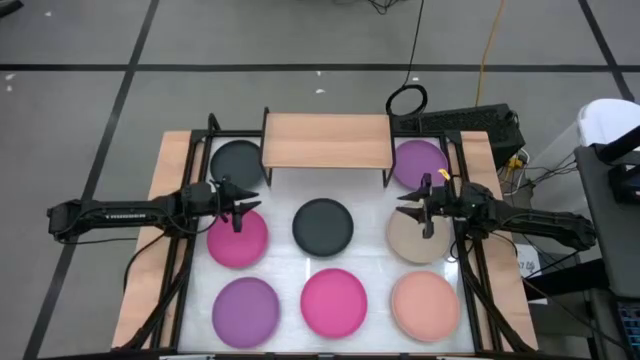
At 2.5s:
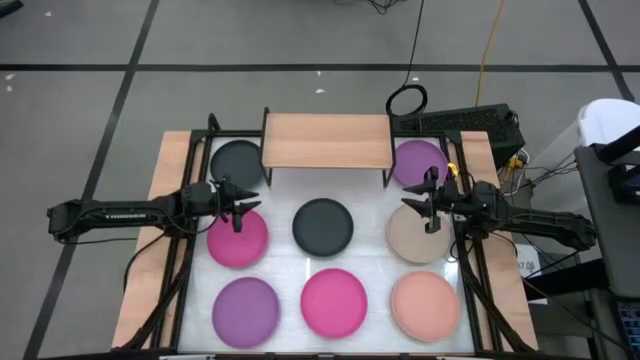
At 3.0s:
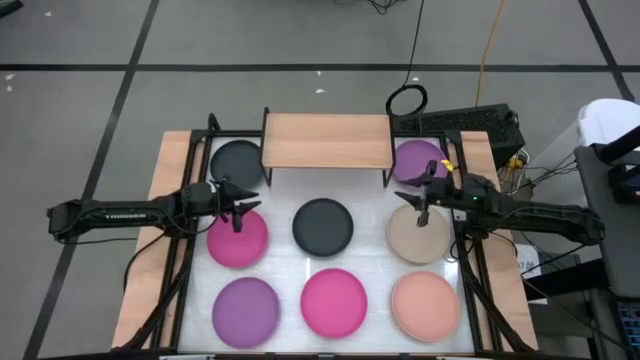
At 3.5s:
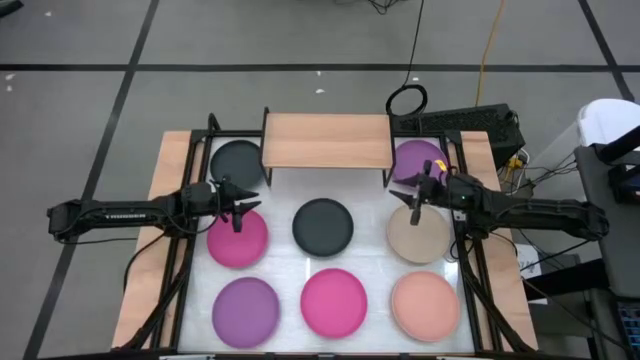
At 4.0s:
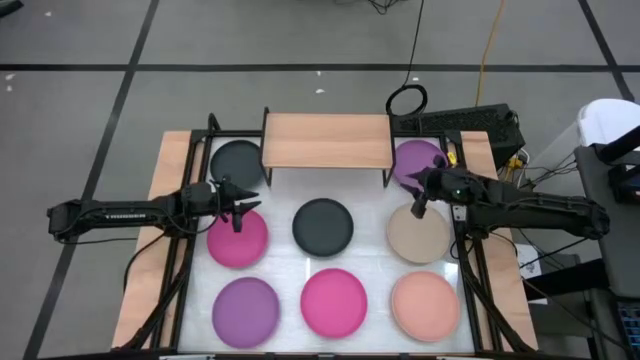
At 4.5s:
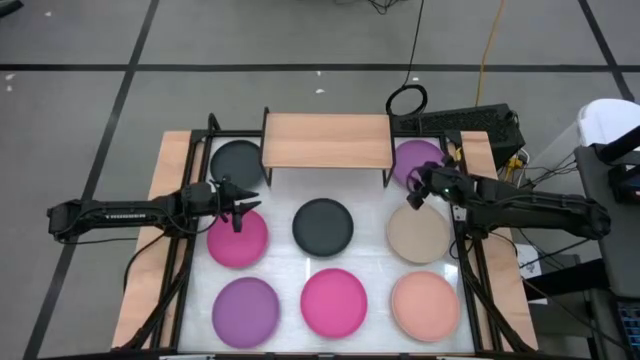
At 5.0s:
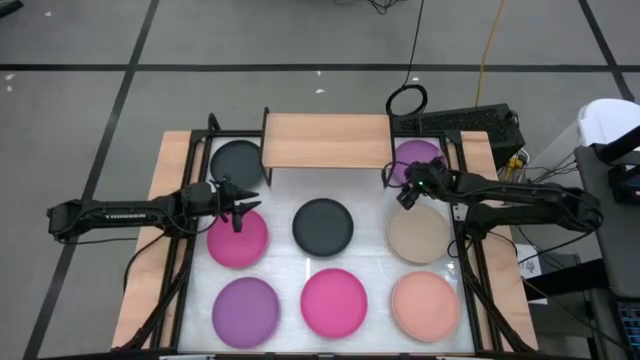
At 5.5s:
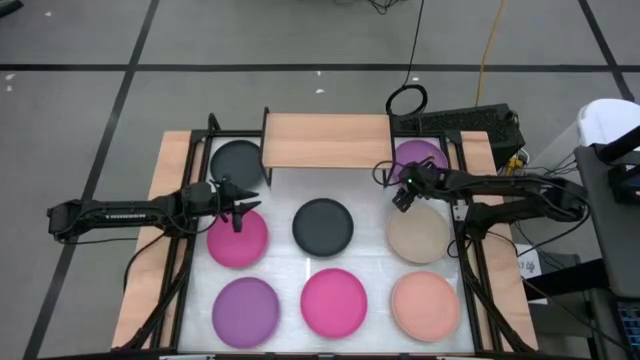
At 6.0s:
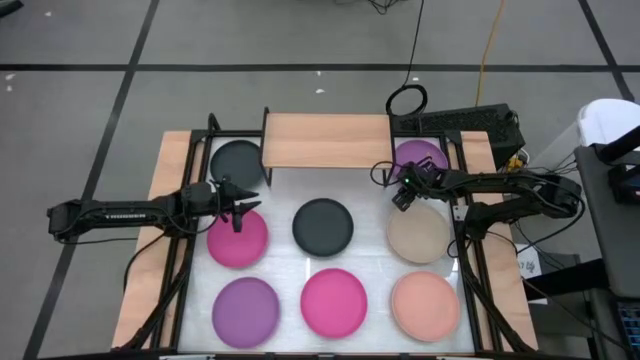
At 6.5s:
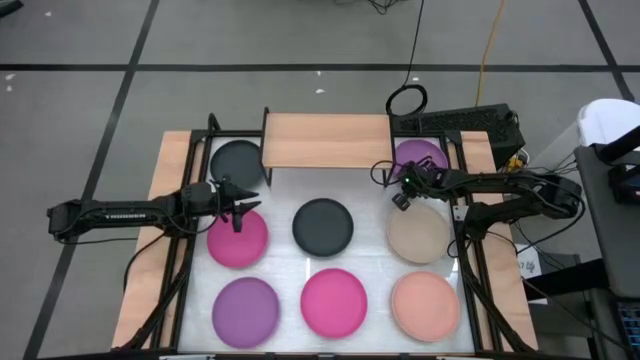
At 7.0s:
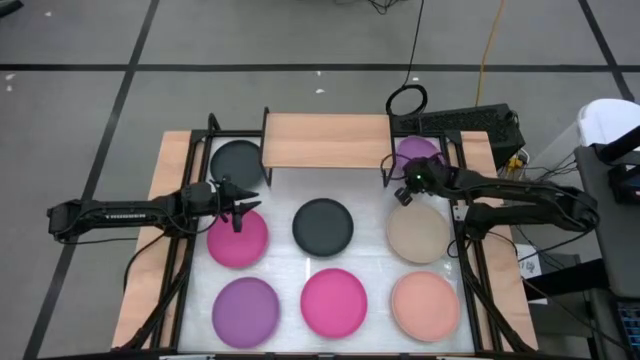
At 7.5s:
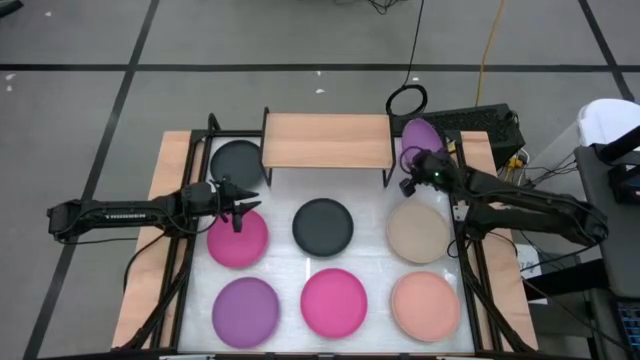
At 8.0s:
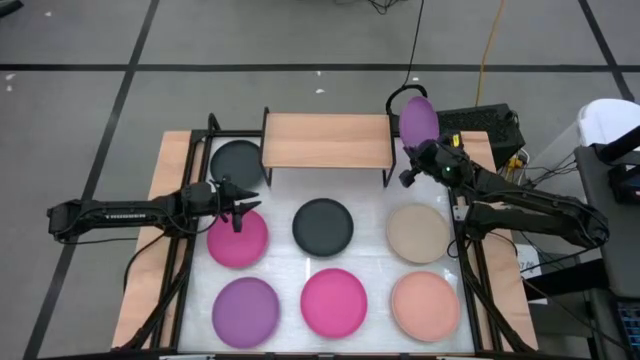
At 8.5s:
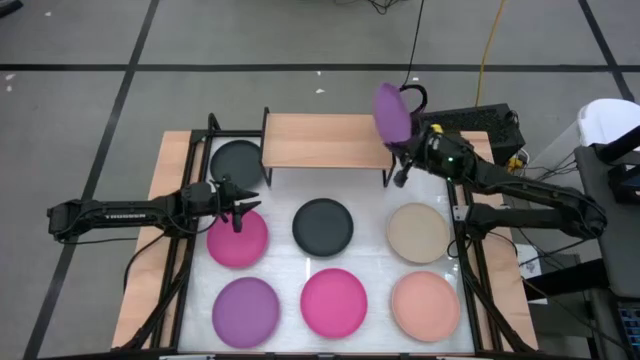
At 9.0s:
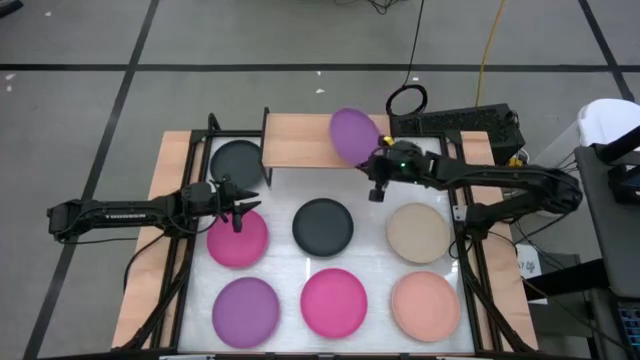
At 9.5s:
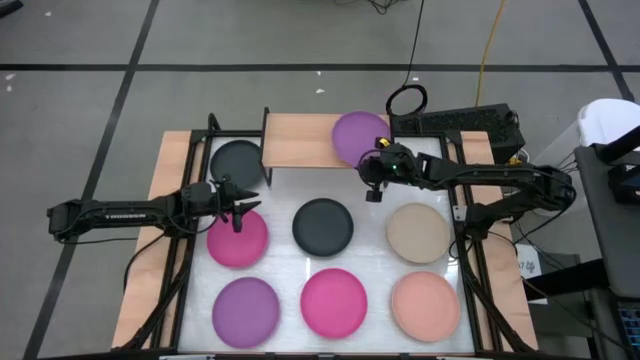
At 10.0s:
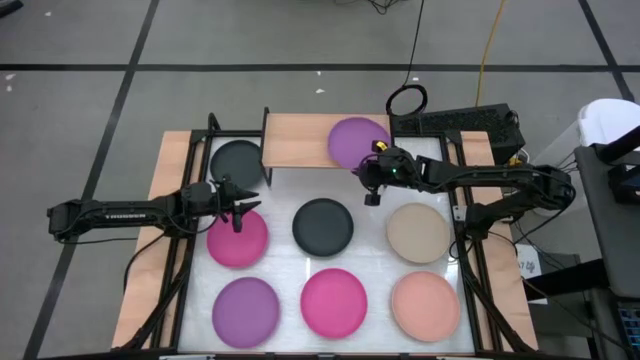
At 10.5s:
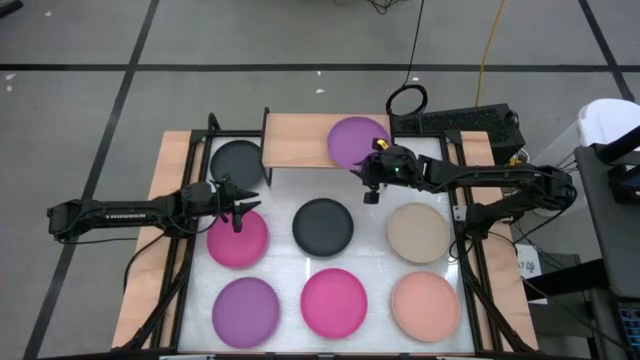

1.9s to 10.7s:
Task: Place and stack plates onto a shelf
Put the top violet plate on the shelf

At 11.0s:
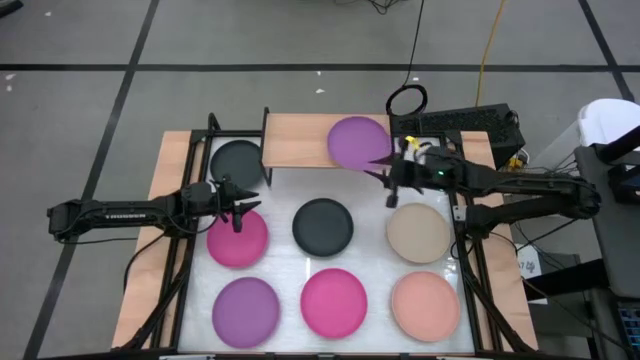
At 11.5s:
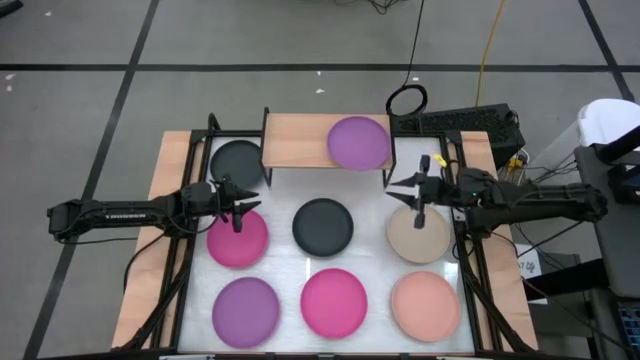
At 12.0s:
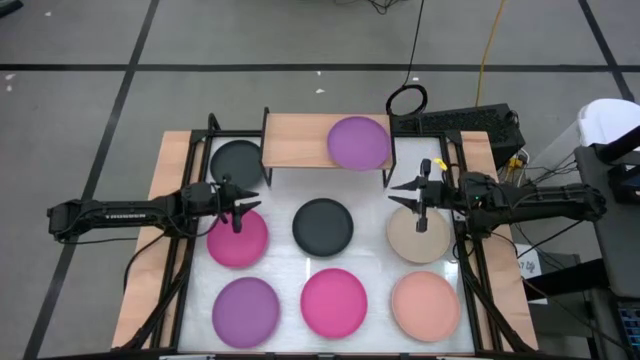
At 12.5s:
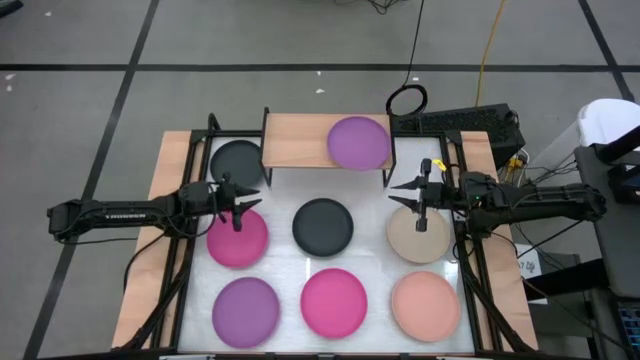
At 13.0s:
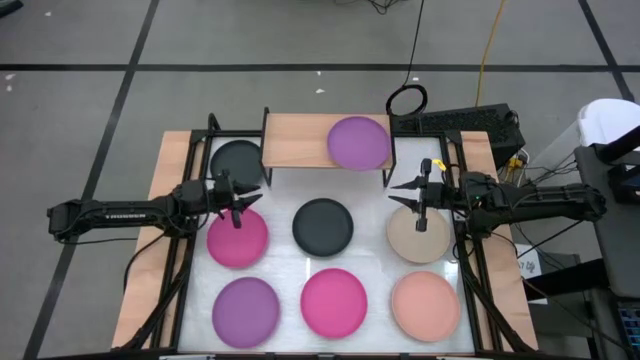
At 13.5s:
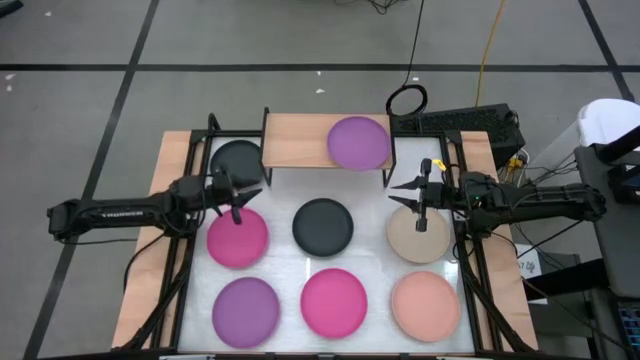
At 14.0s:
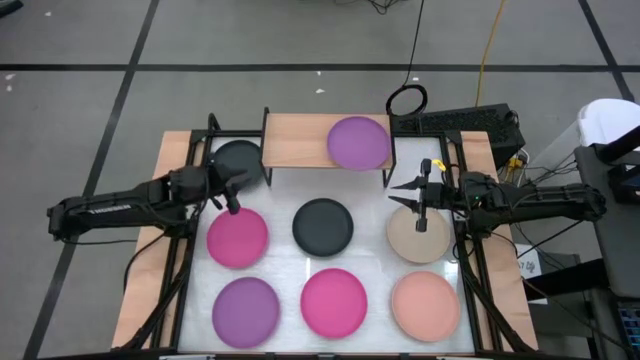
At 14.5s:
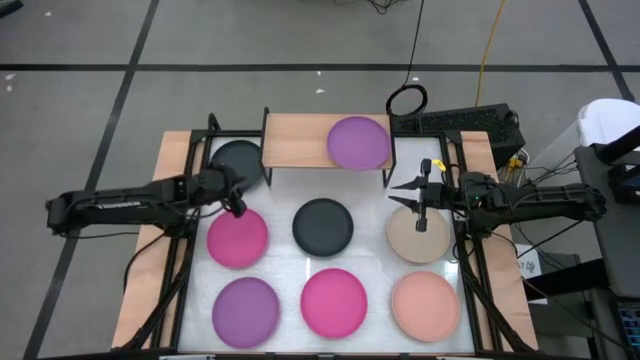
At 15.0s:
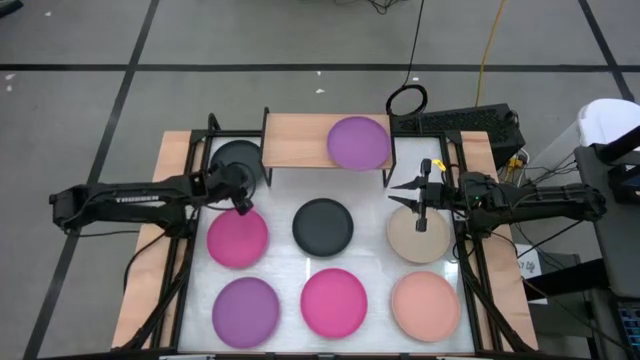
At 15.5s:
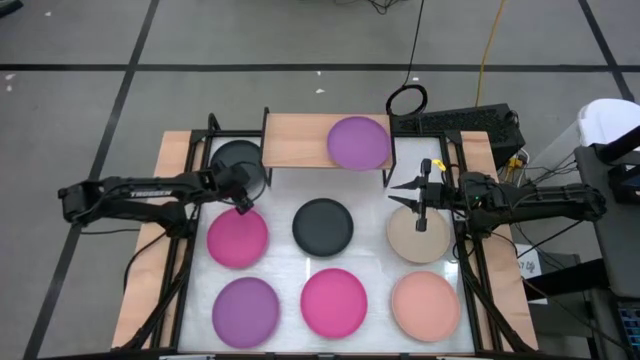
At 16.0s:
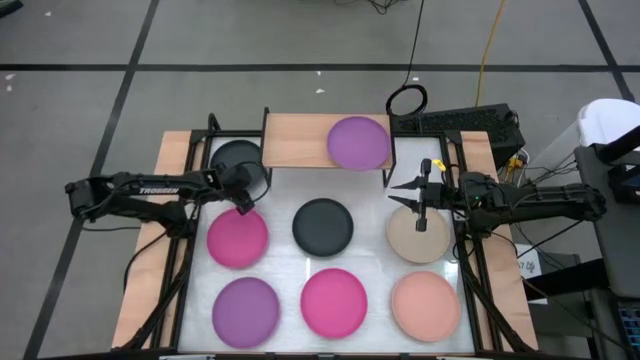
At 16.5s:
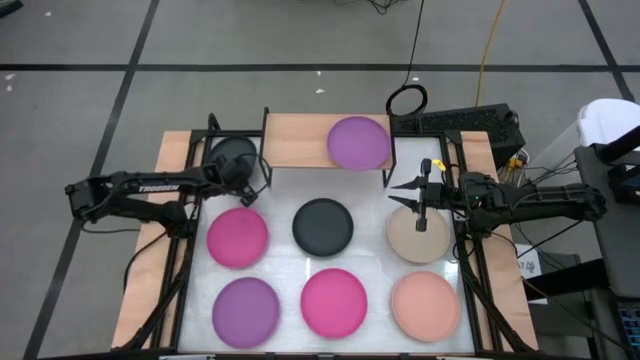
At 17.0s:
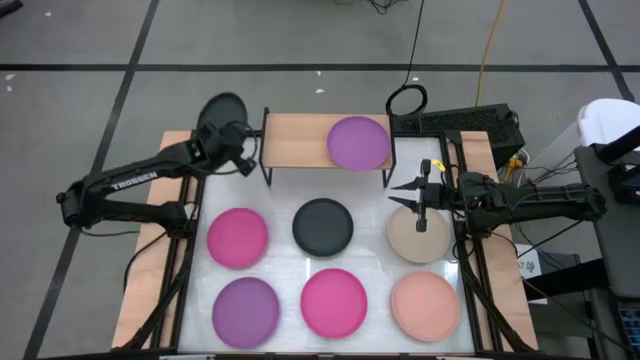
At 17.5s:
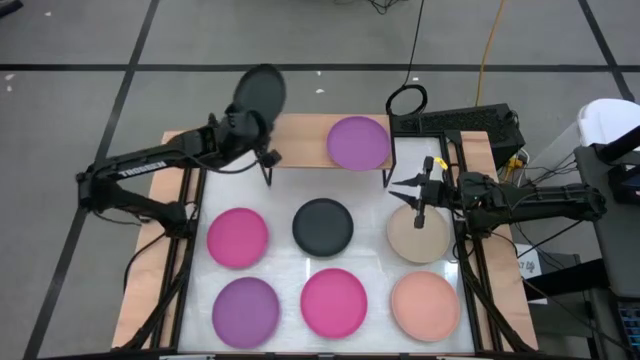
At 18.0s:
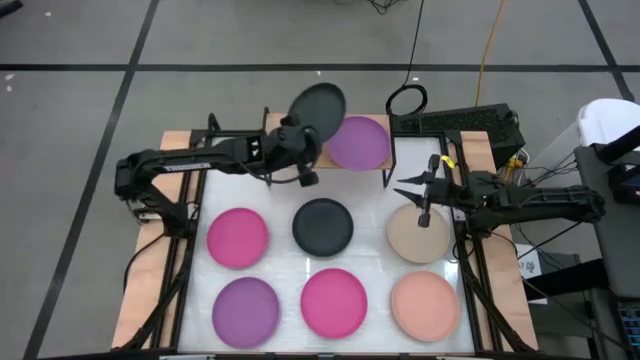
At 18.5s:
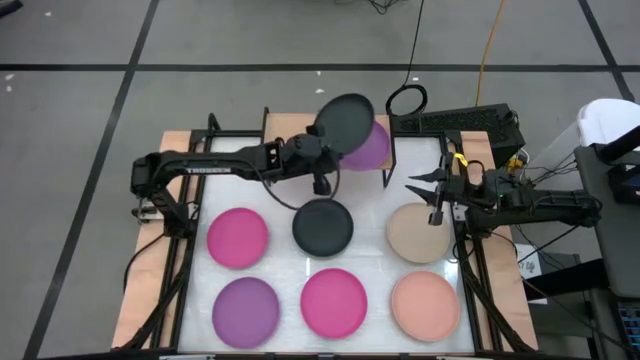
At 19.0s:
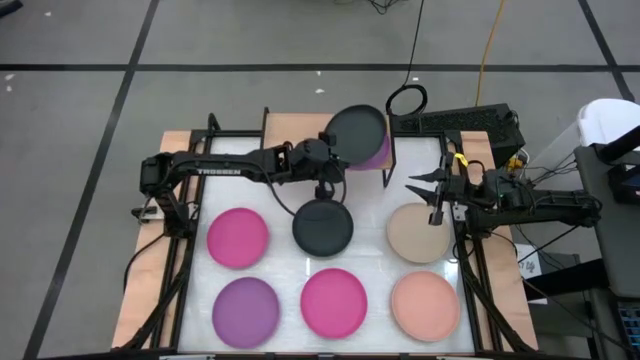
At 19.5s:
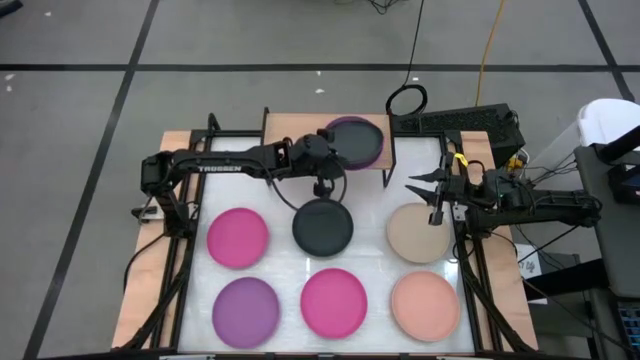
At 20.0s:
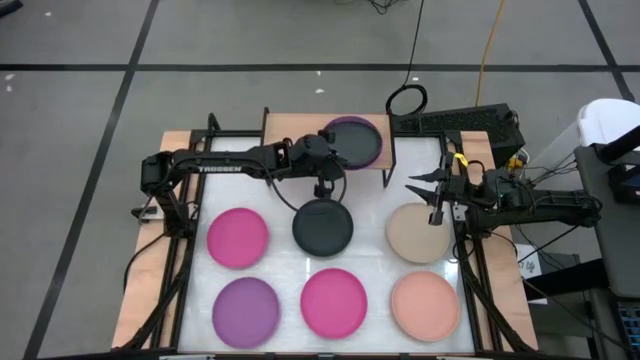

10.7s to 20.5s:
Stack the top black plate on top of the violet plate on the shelf

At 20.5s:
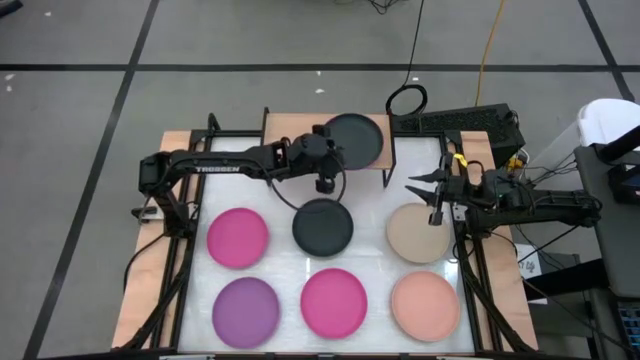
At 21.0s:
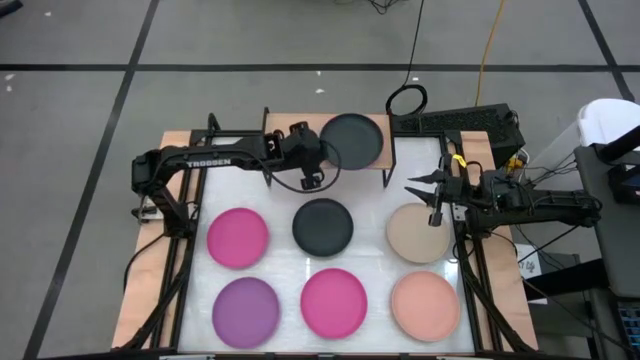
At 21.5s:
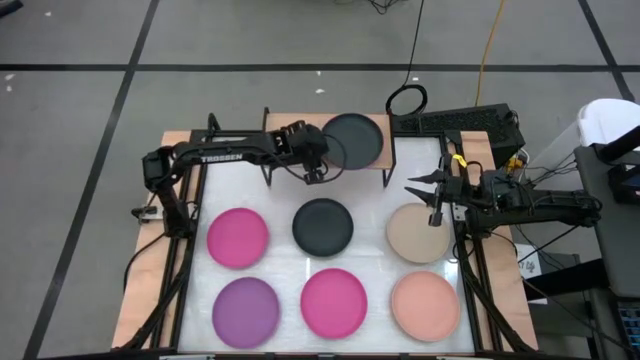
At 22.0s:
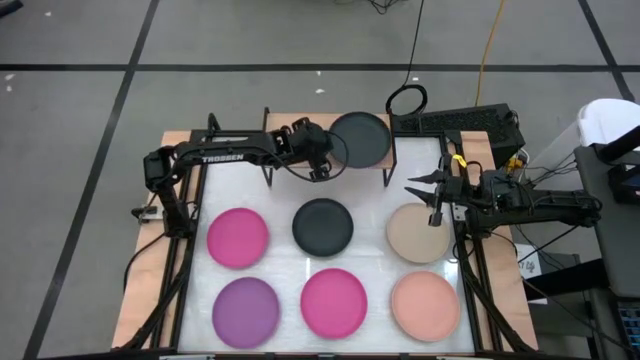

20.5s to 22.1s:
Adjust the stacked plates

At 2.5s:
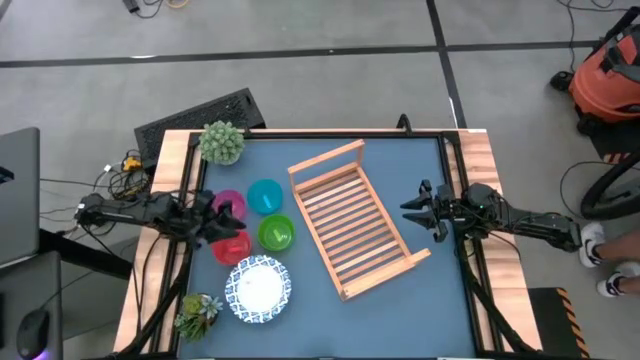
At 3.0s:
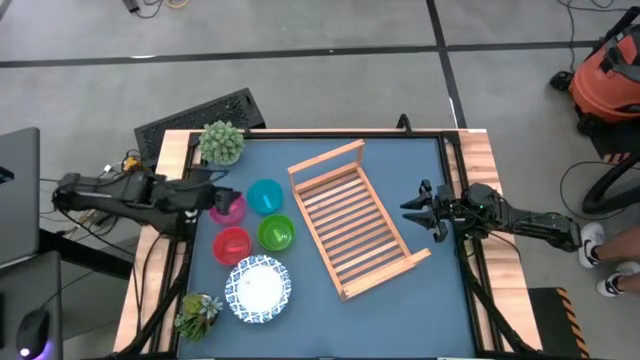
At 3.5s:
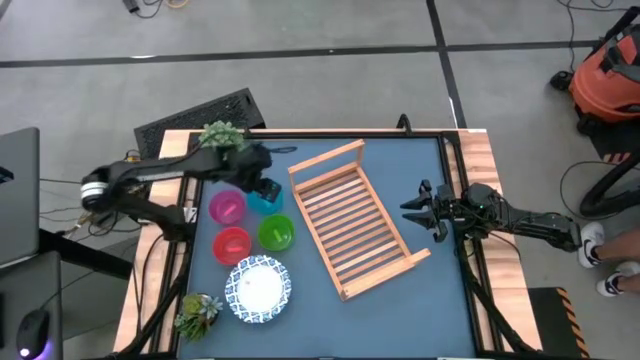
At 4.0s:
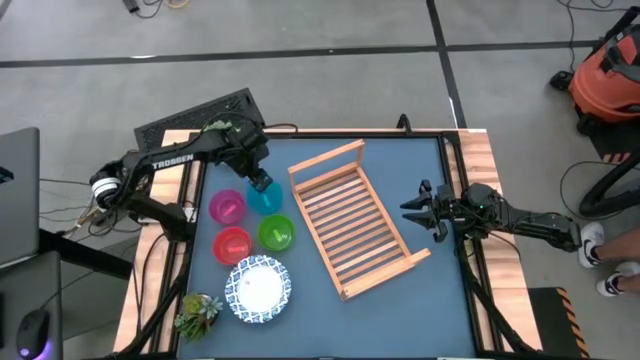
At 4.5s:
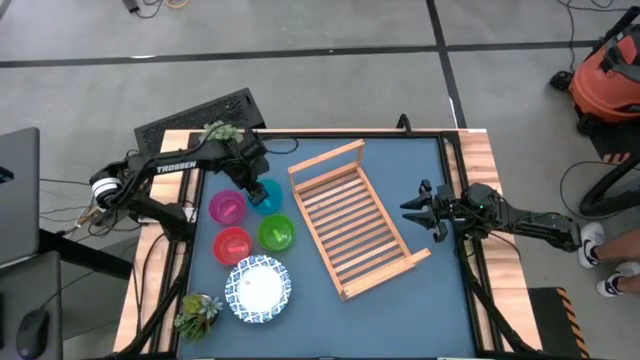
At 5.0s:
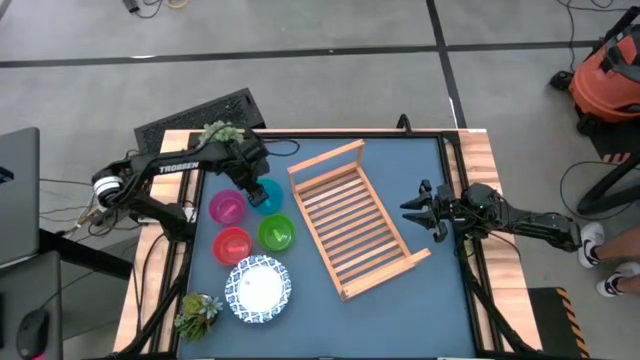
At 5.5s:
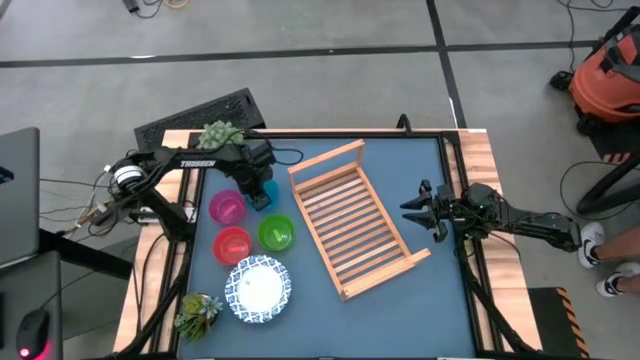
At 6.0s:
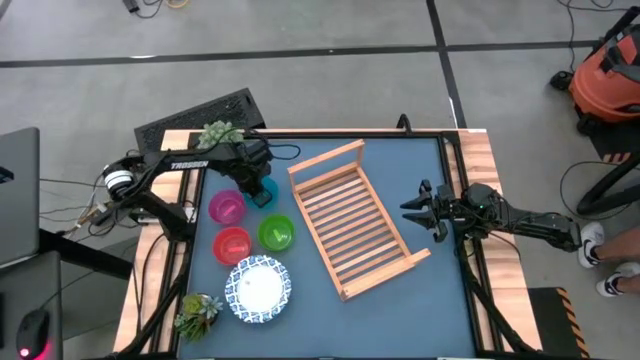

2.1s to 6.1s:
Task: Place and stack bowls onto a shelf
Put the blue bowl on the wooden shelf
